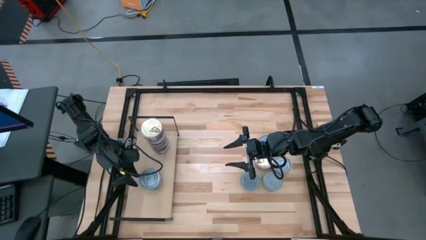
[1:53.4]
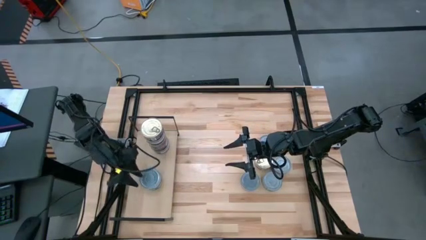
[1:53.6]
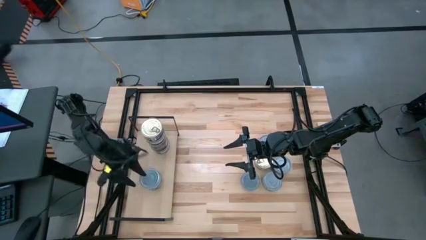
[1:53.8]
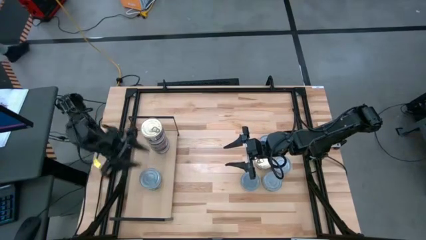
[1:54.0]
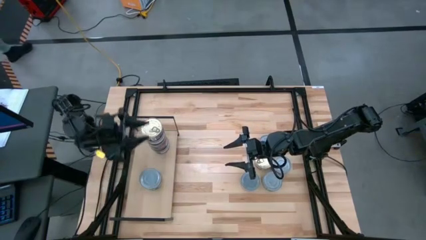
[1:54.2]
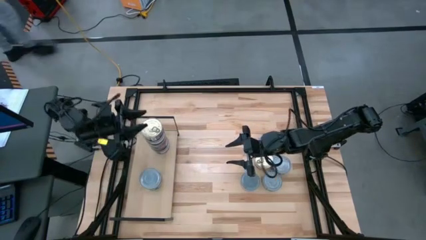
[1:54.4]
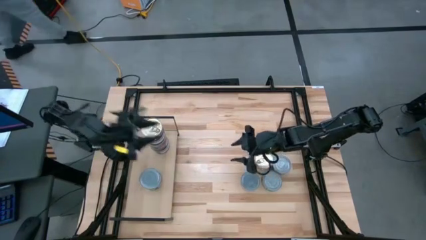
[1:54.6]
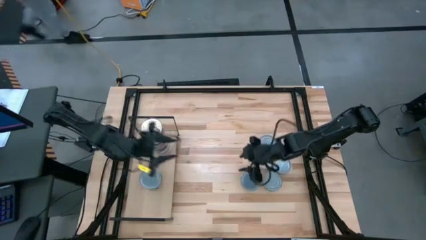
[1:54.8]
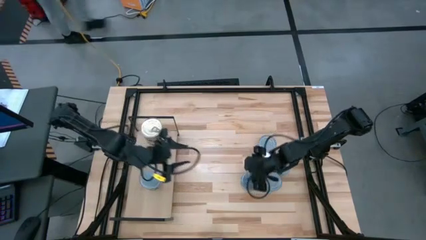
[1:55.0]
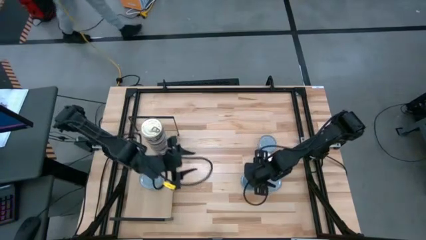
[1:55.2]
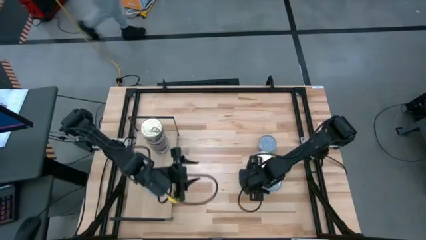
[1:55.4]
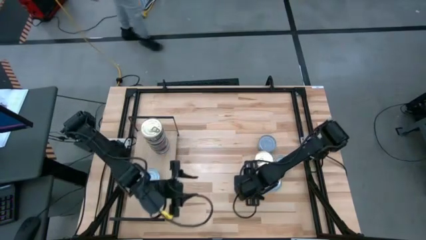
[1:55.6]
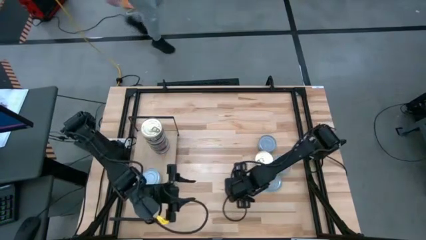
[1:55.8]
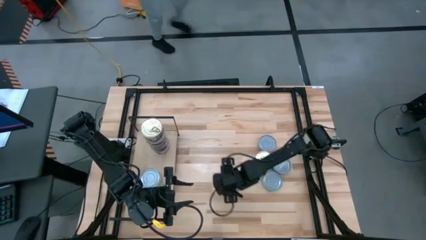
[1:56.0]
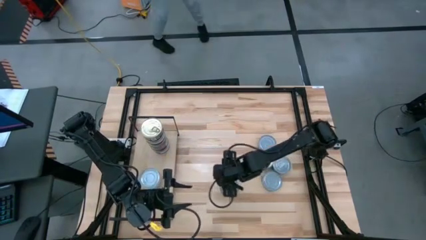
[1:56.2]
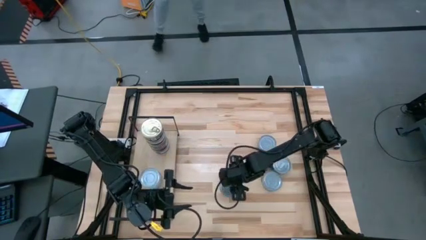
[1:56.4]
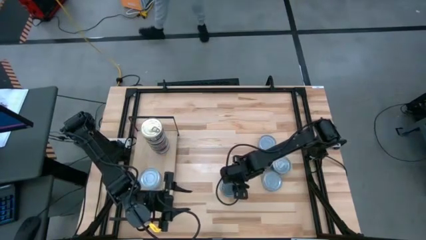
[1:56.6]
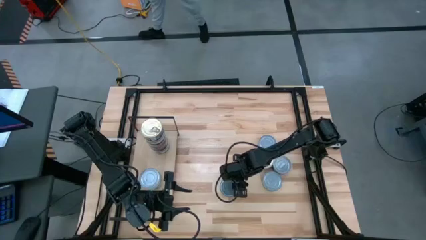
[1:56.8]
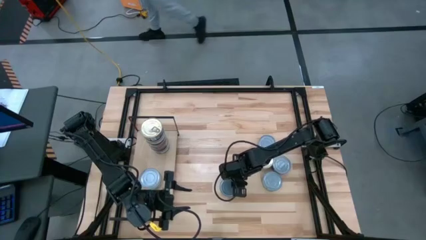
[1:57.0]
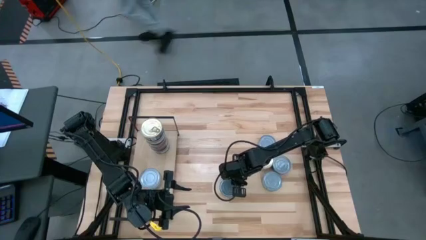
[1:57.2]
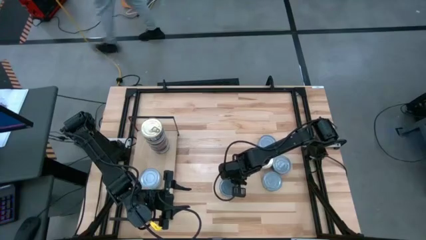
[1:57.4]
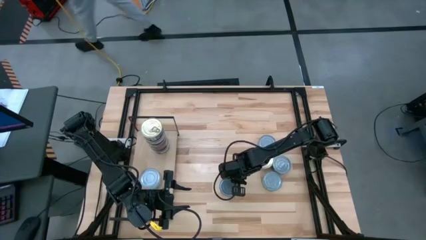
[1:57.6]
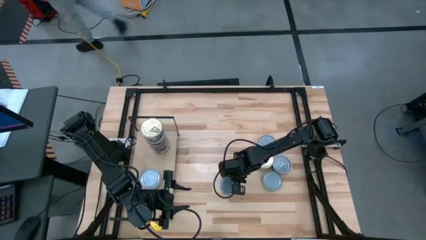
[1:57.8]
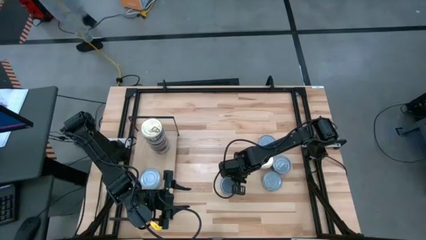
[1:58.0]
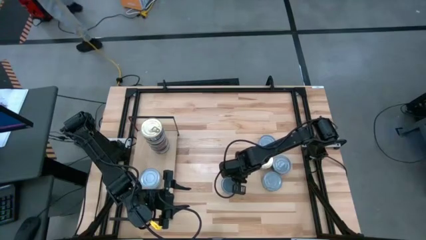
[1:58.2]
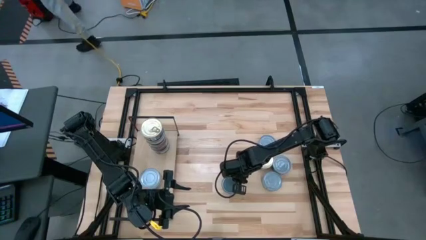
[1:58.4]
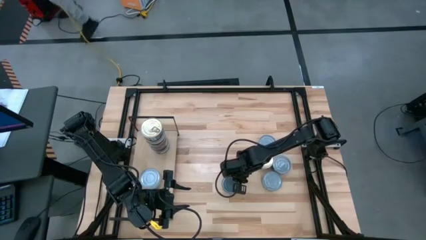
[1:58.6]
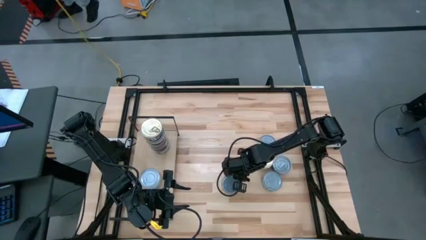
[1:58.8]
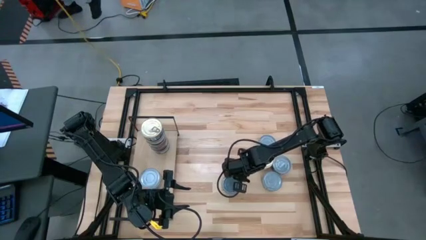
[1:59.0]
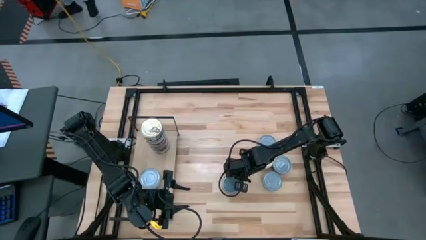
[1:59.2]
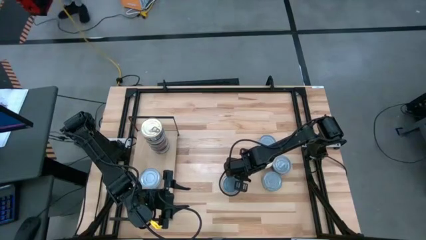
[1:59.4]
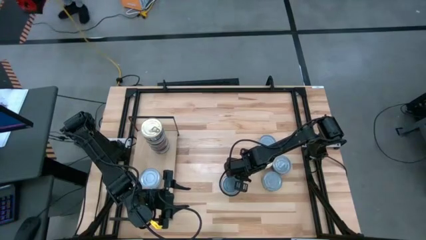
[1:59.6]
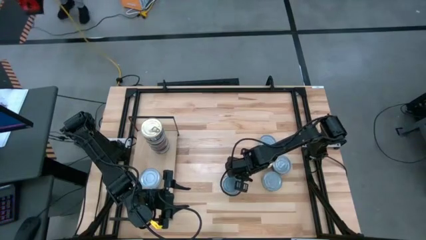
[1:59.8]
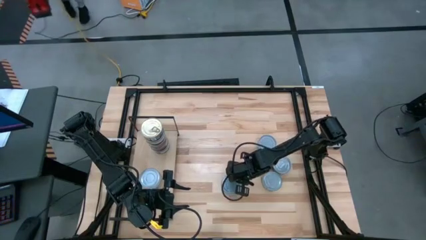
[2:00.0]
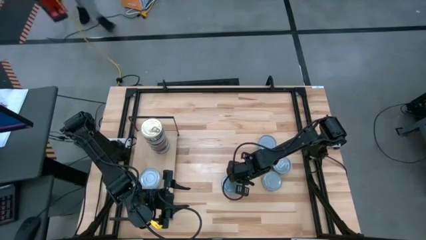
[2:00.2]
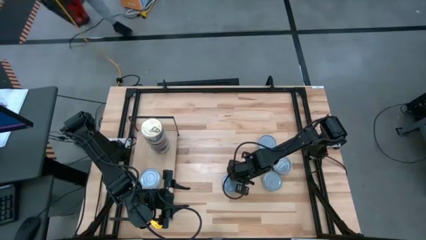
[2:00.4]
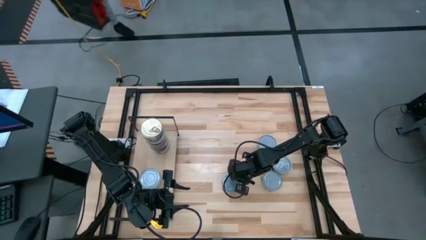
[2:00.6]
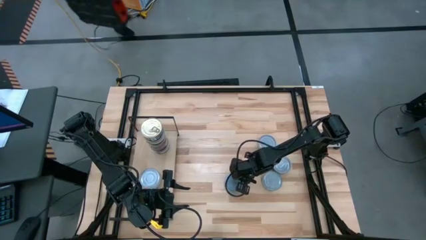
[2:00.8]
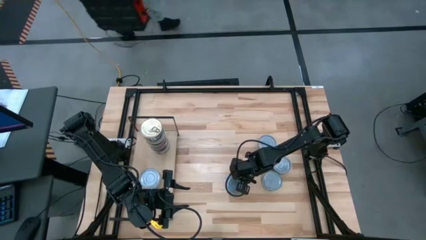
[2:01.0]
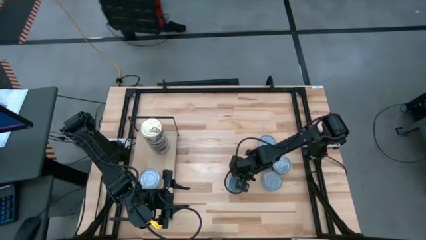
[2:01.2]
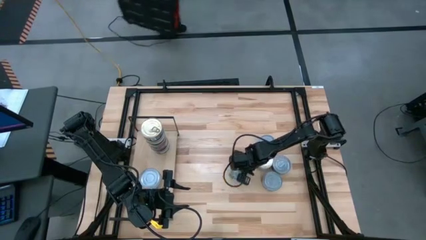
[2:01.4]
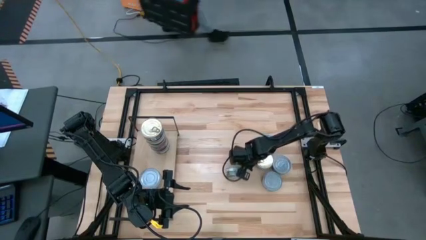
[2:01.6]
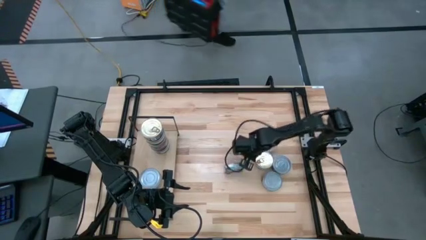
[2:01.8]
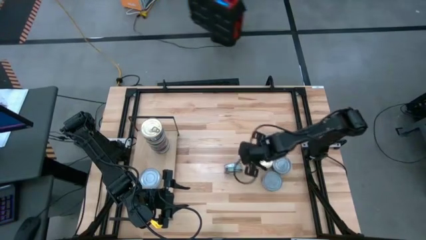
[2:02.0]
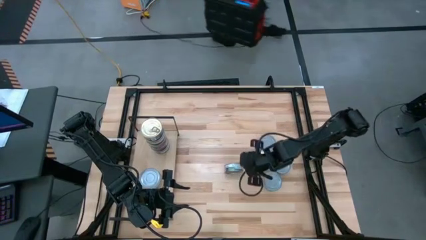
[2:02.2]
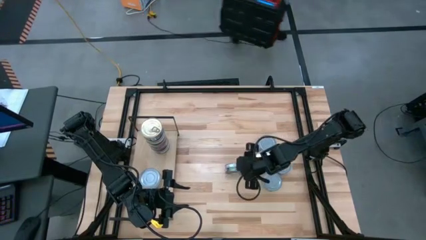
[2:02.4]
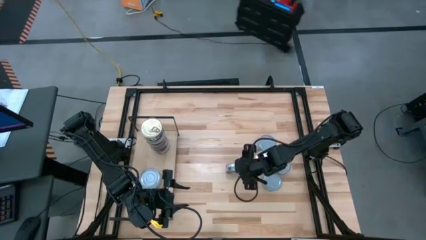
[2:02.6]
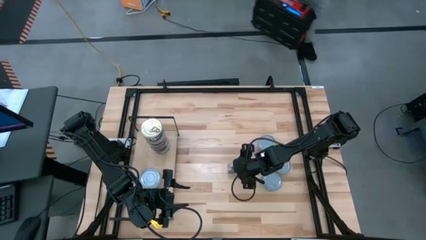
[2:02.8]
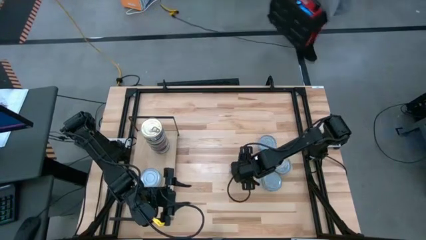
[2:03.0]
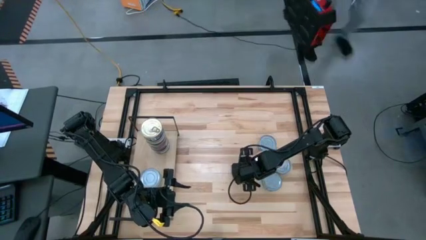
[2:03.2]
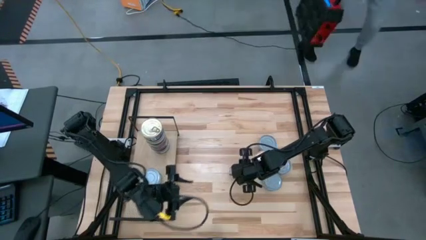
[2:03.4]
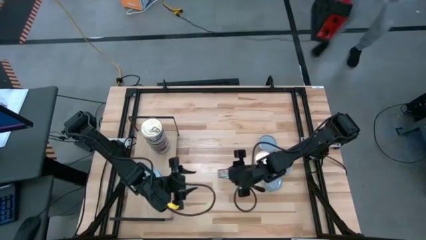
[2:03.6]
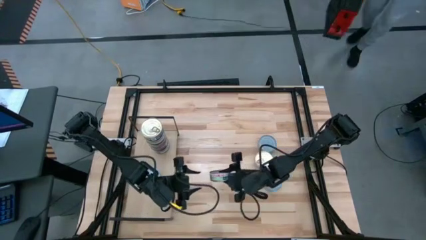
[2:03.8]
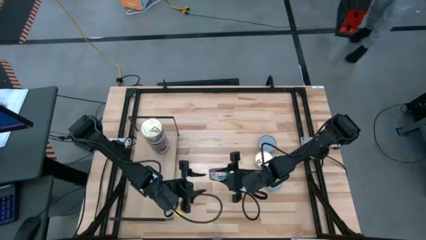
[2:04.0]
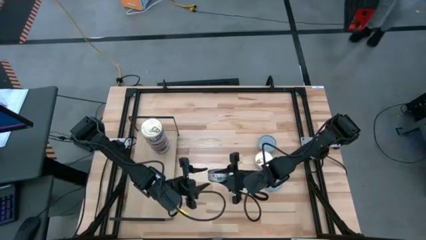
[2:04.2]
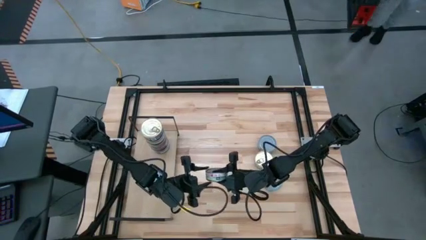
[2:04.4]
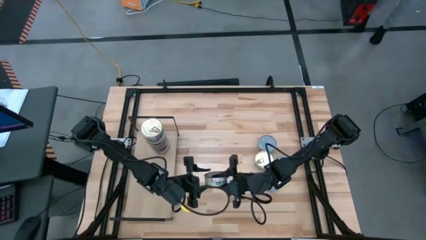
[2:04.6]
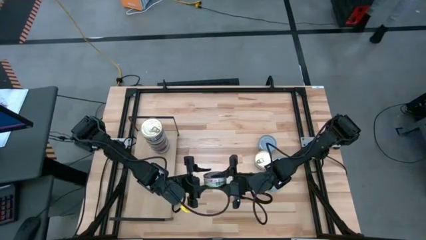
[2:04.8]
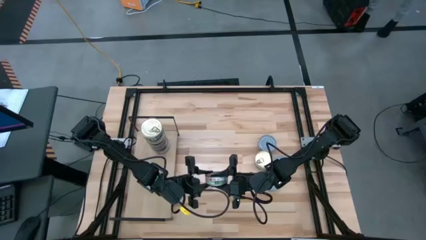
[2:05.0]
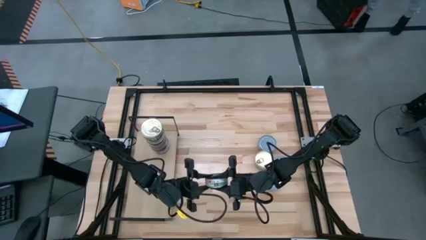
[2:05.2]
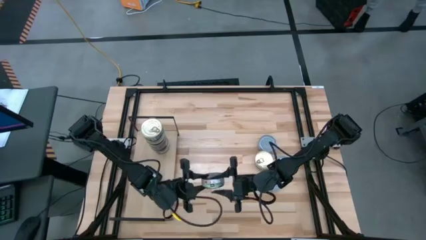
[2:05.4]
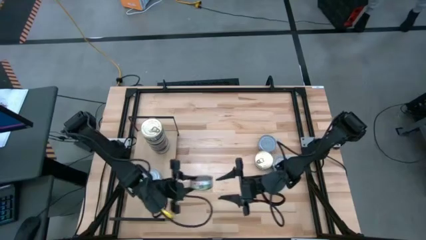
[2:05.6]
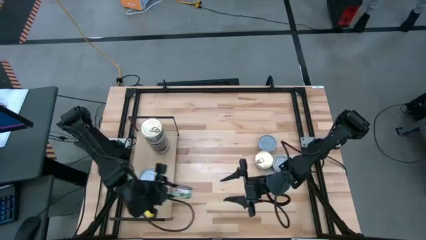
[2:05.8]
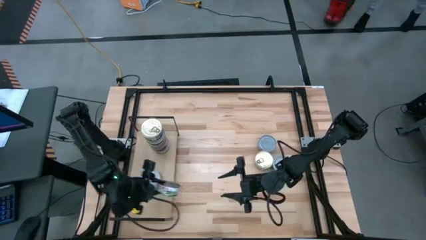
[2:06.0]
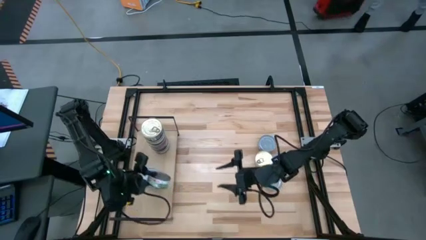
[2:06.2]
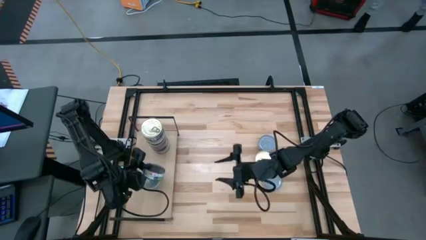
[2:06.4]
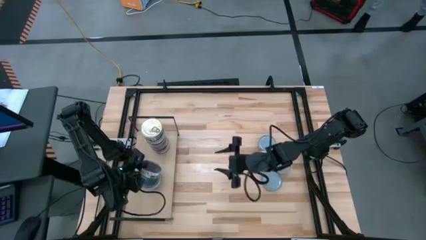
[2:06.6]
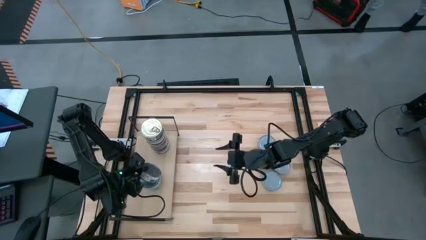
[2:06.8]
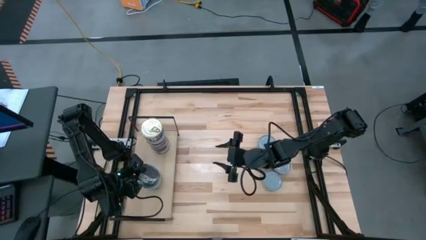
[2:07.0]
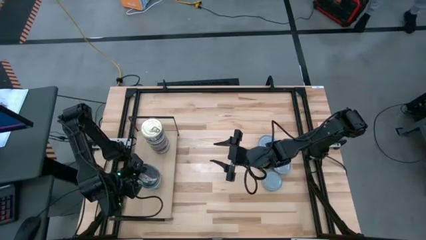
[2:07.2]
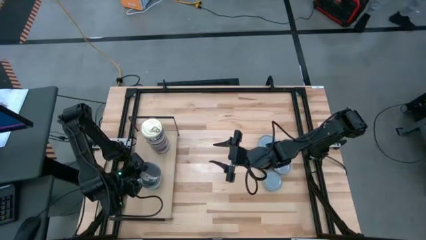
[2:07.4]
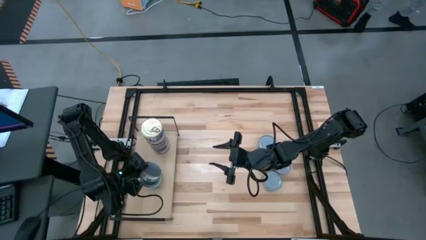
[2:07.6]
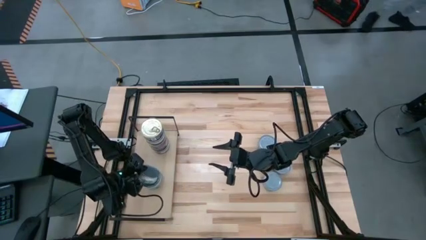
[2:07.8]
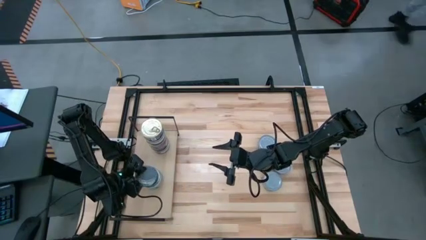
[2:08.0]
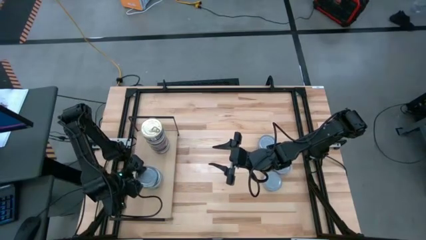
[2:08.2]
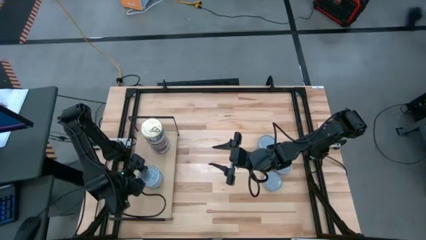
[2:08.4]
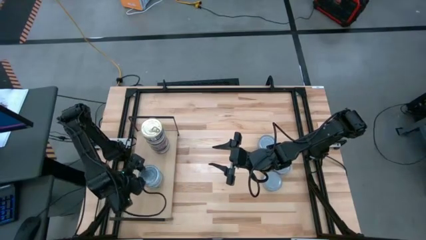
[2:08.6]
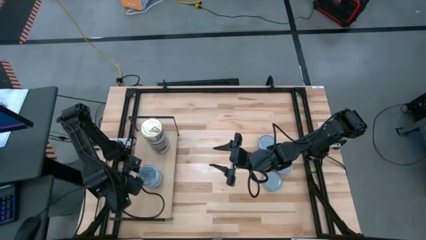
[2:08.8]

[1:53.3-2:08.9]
Task: Stack canned seafood by type on shelf
Stack the green and white tuna can on the green and white tuna can on the shelf
